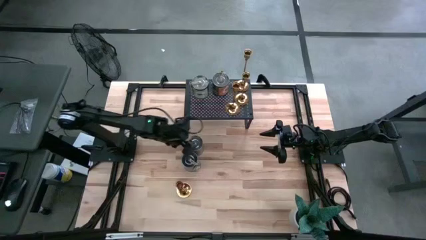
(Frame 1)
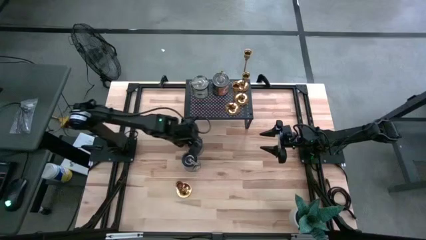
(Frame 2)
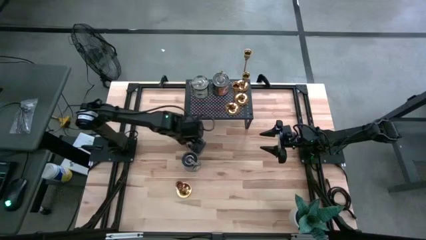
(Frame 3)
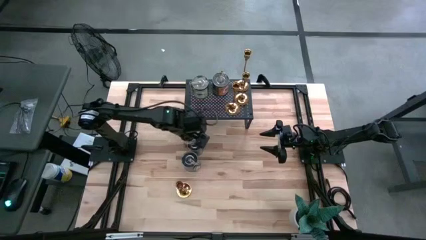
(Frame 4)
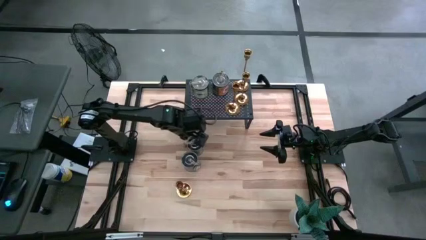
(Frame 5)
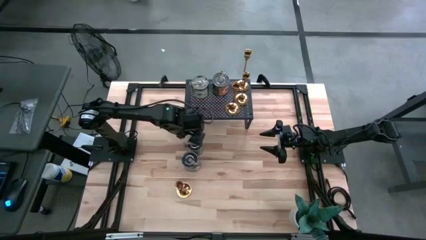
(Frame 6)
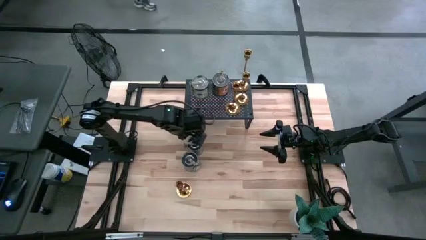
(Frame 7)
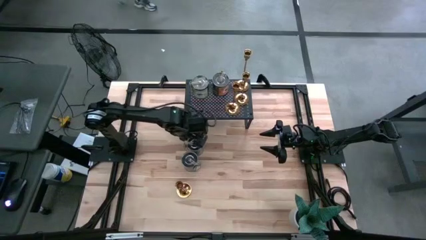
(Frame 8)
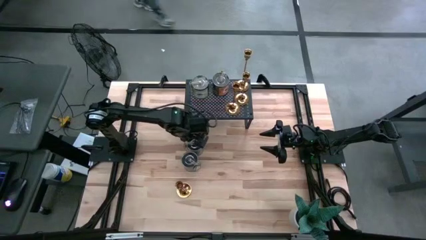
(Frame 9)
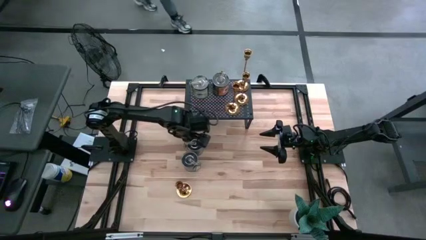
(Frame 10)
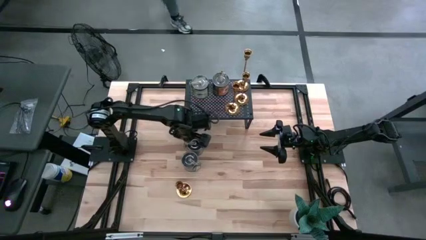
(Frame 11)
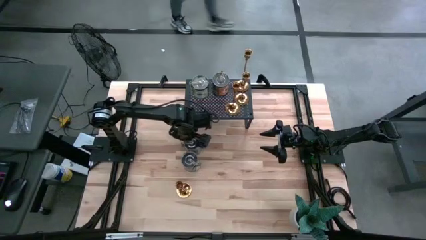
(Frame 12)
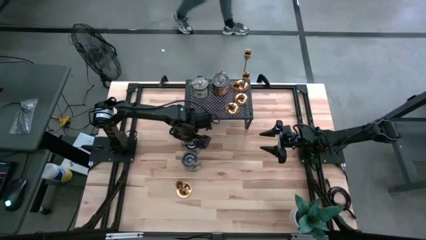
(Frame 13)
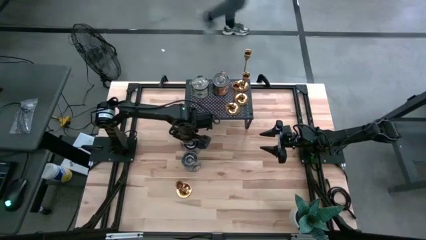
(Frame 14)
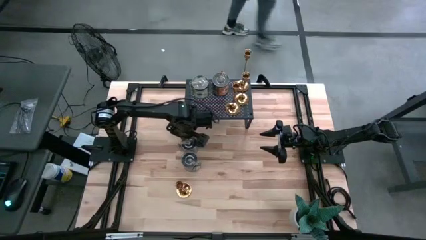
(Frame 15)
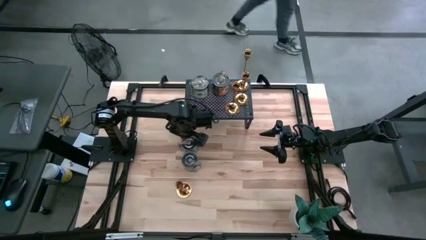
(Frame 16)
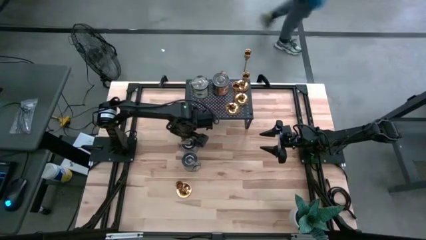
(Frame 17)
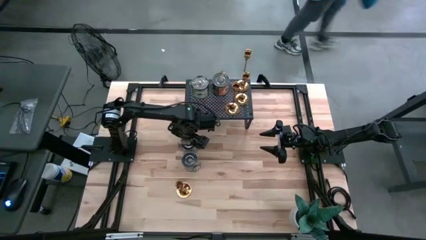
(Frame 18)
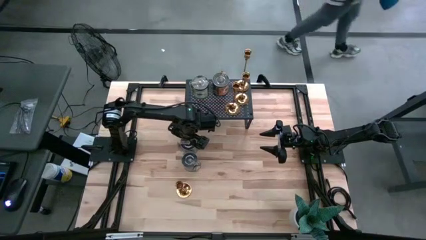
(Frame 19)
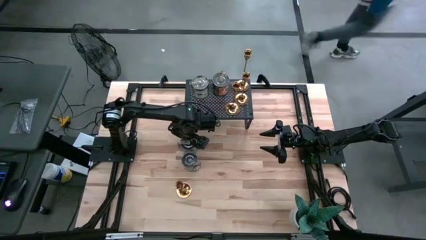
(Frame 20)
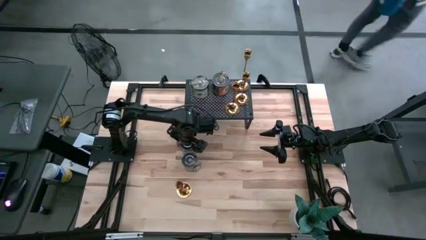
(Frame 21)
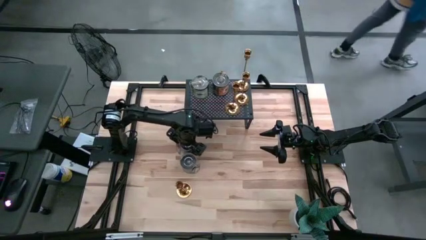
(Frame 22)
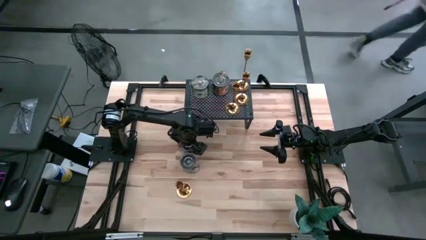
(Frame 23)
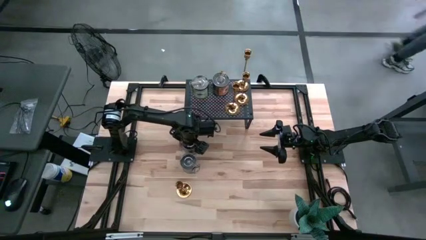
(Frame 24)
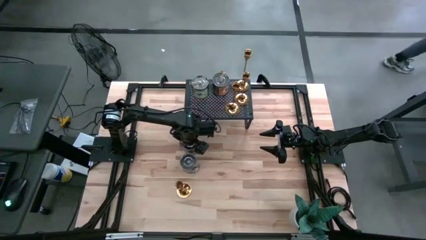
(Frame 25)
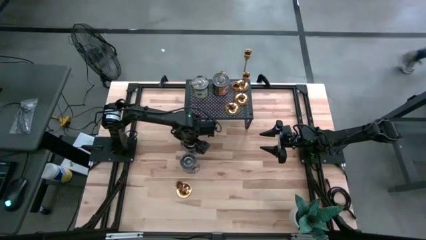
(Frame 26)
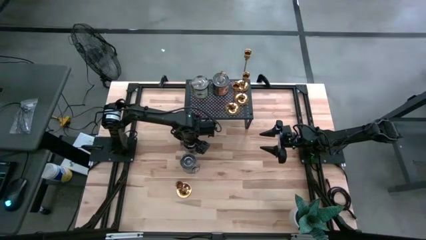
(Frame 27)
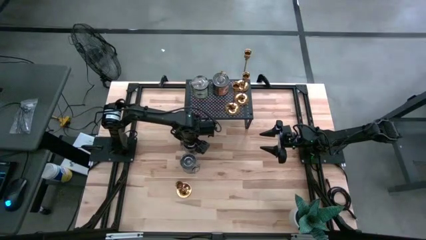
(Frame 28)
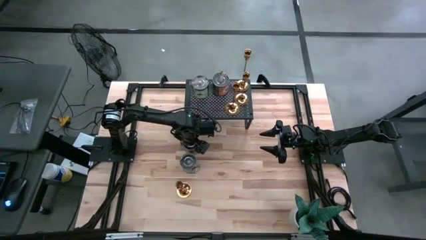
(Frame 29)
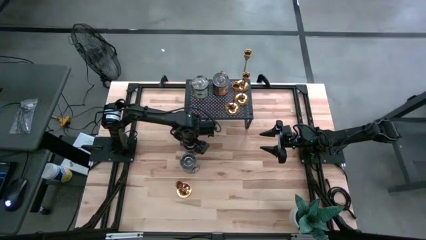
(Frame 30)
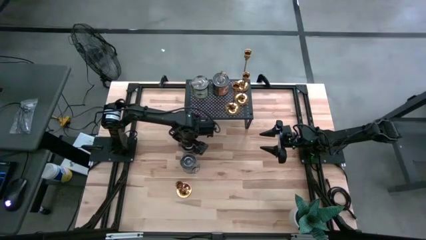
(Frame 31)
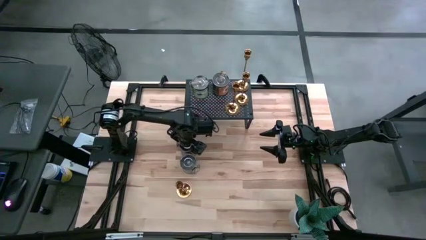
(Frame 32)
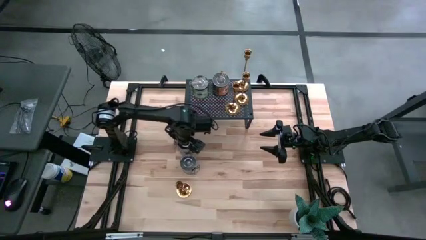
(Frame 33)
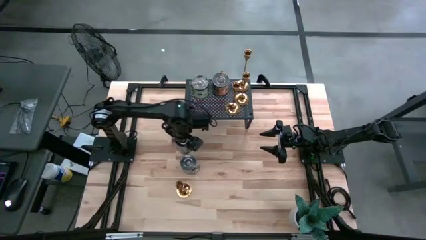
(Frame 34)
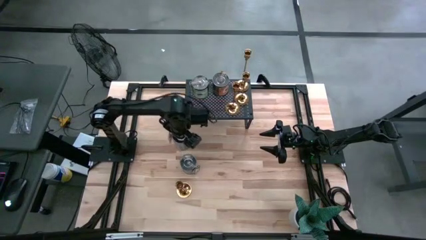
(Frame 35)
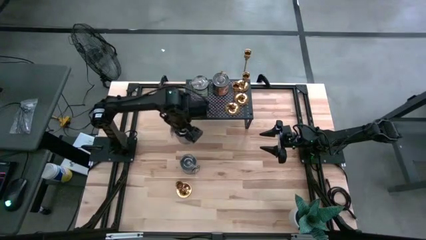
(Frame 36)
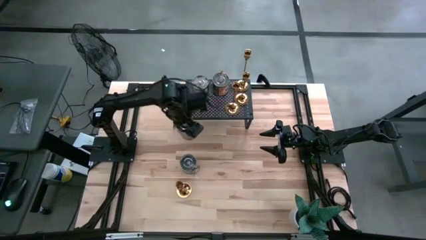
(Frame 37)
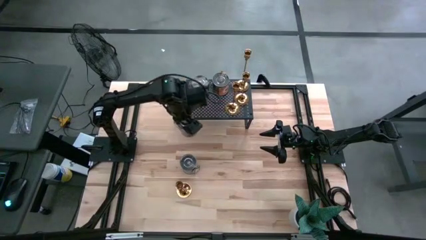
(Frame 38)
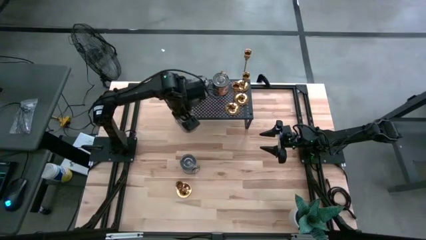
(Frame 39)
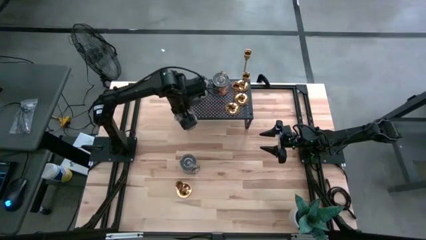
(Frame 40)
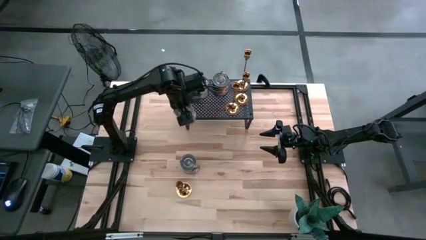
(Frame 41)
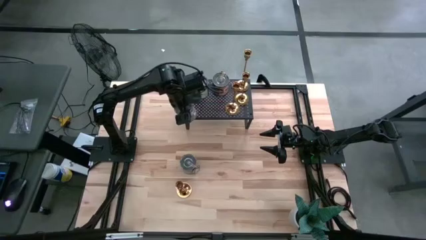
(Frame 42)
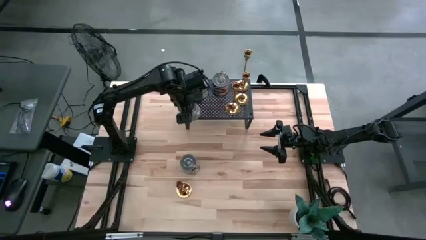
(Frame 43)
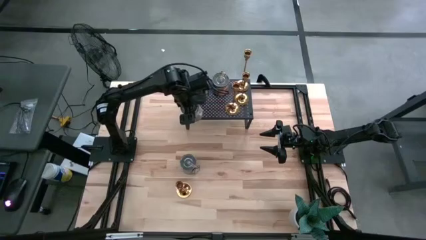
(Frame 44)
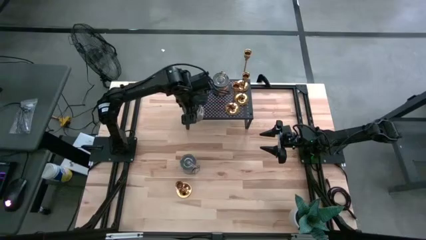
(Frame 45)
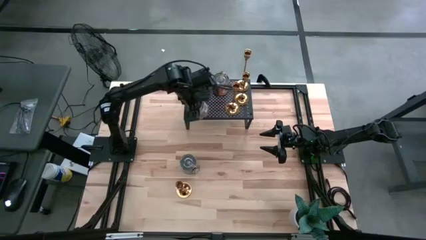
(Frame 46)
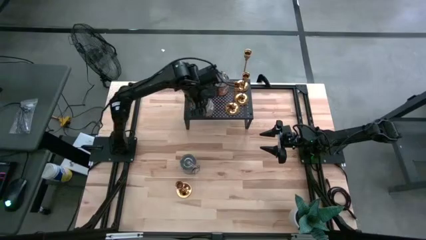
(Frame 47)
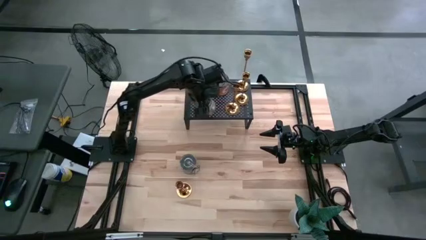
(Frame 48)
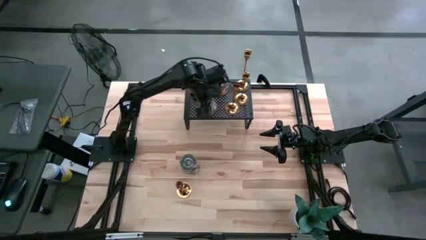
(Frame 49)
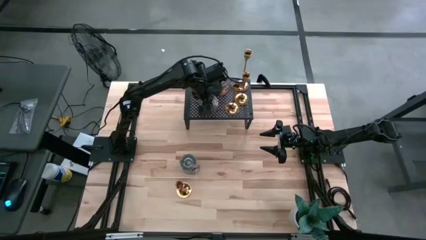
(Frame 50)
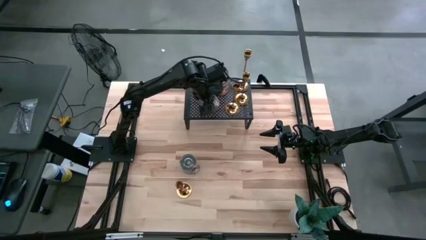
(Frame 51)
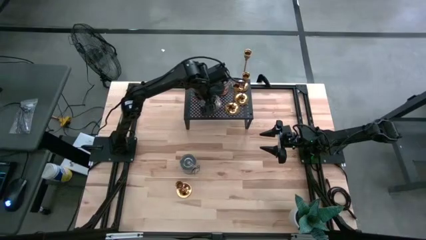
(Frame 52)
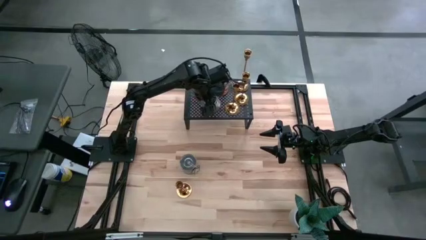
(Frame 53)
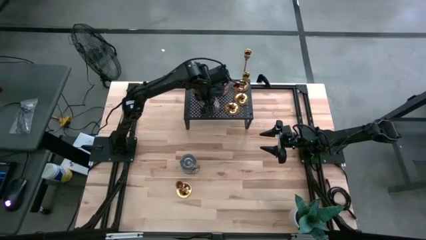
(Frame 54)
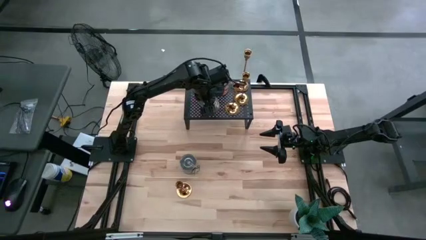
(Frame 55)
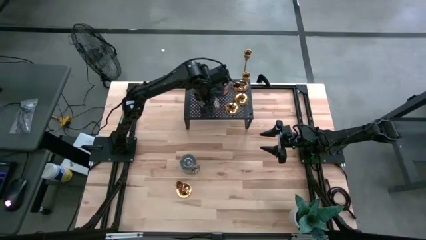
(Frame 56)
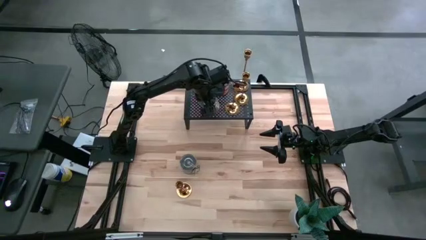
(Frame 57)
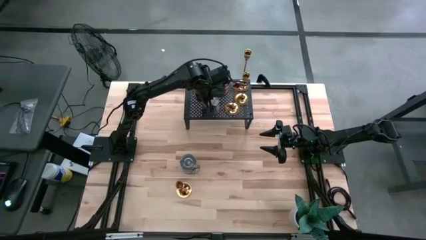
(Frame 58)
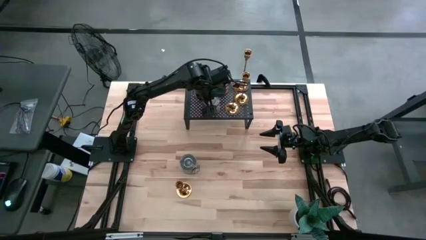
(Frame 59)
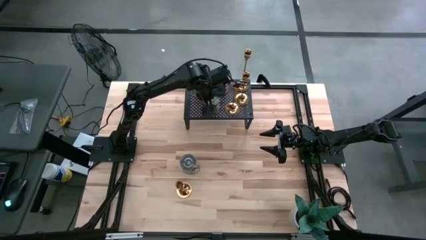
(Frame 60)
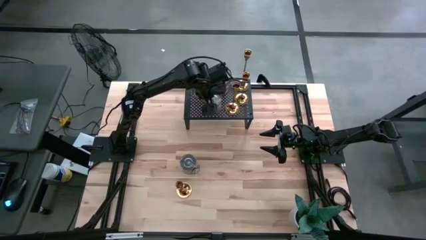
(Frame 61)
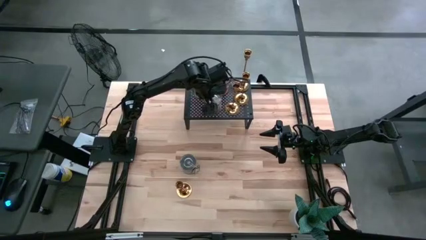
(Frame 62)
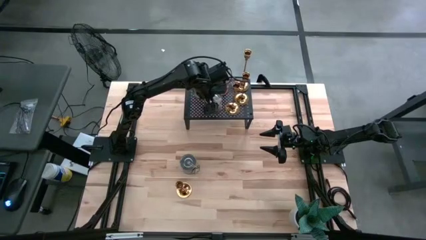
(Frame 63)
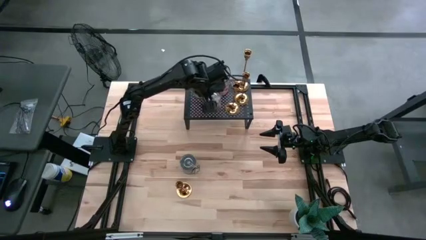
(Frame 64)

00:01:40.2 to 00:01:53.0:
Task: Pick & Place candle stick holders
Align the brown scented candle with the orange scented candle on the shelf

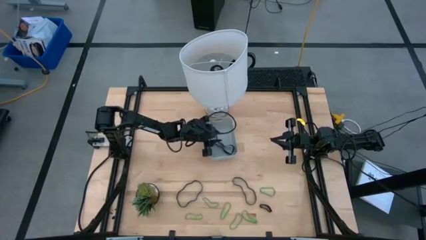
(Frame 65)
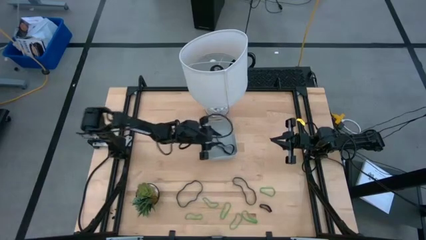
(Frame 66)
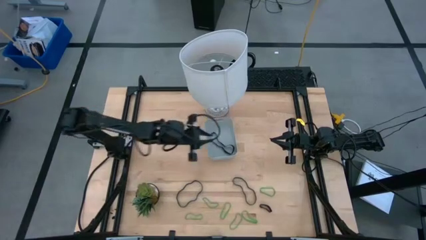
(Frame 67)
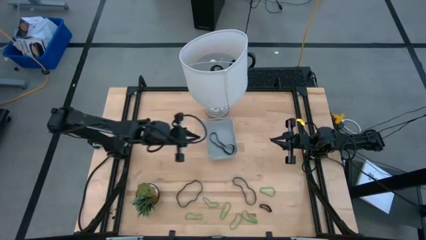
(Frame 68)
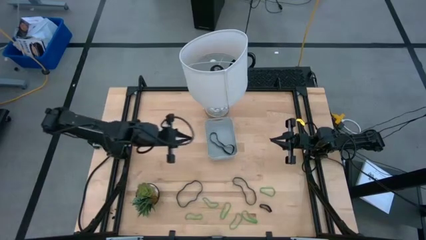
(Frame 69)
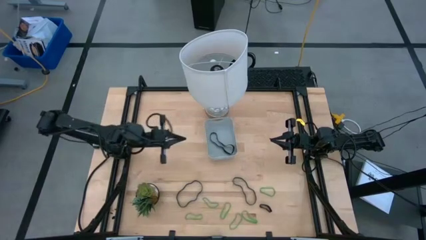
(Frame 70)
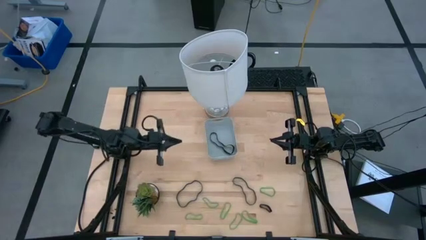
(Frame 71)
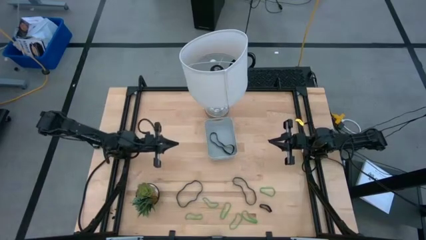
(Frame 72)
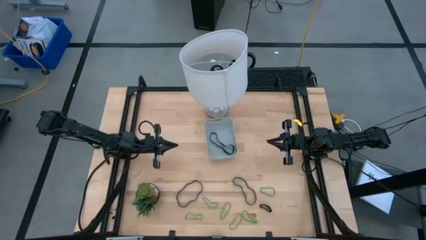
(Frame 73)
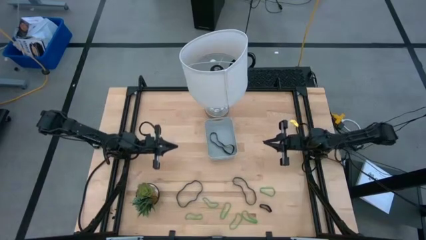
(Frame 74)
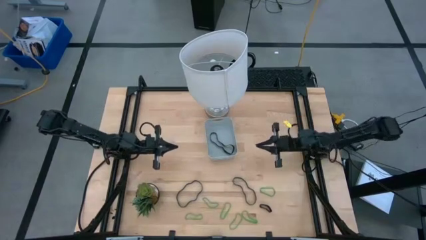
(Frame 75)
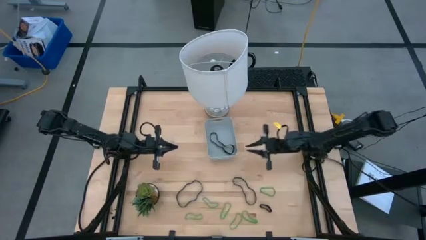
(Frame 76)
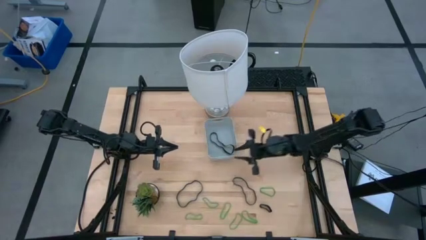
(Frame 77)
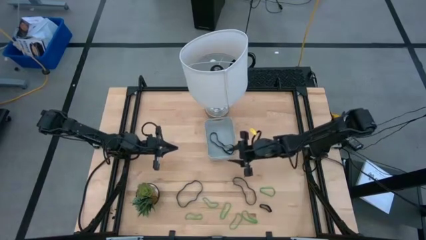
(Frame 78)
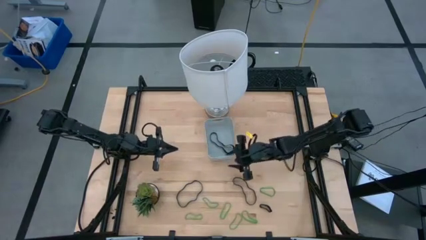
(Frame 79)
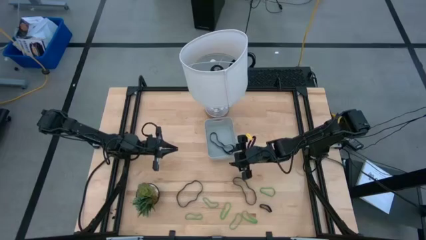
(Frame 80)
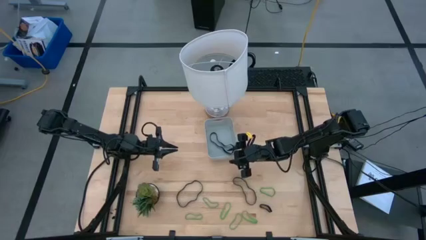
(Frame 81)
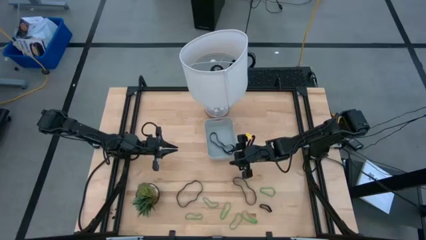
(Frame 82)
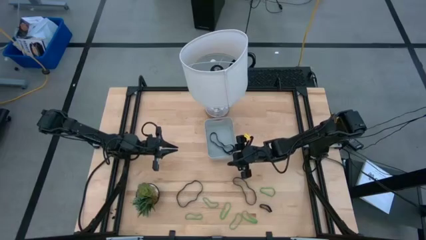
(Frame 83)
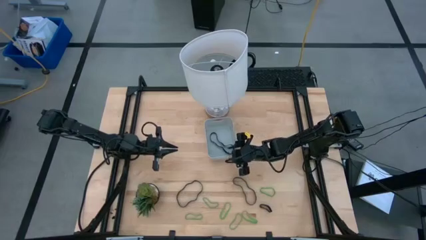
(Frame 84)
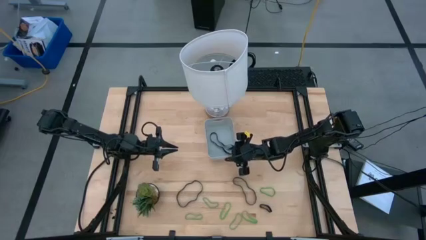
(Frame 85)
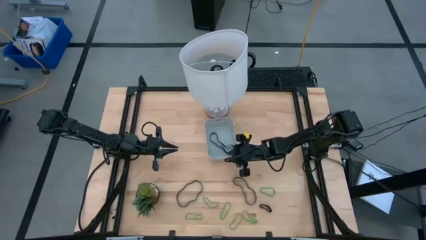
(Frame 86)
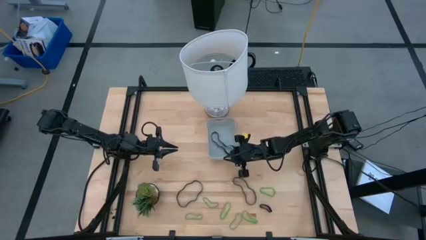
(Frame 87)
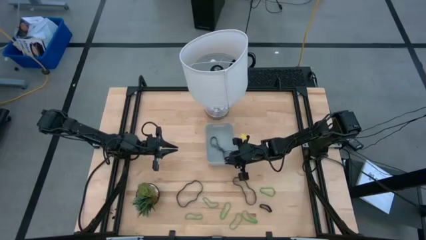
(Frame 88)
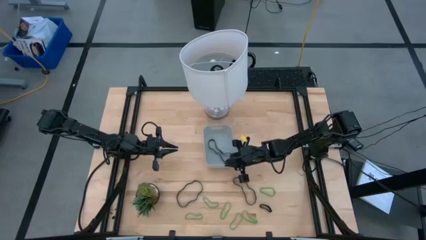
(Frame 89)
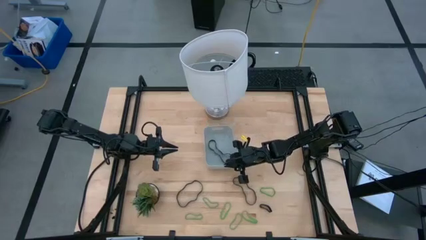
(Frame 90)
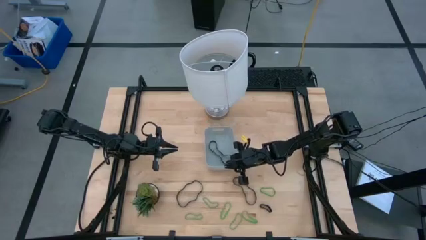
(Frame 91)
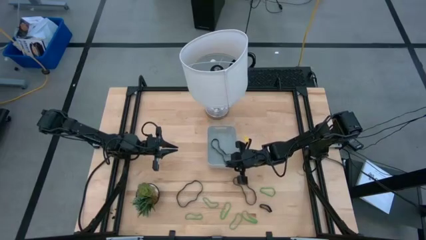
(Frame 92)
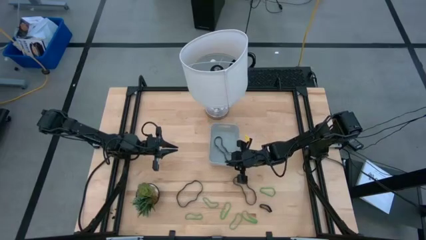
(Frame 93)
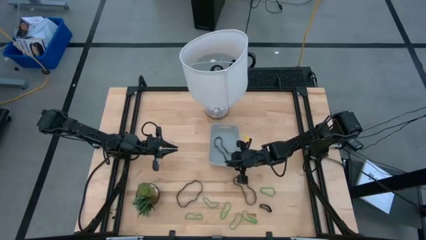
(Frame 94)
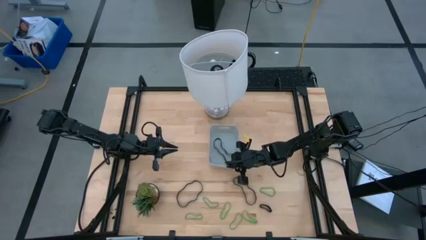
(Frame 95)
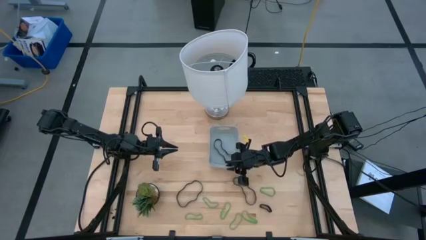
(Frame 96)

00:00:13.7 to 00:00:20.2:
Task: Pick and place rubber bands into bin
Adjust the gray bin
